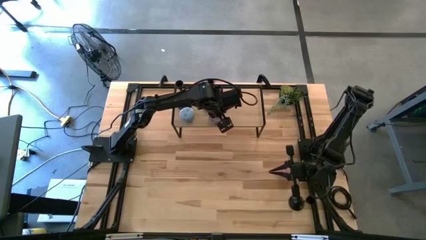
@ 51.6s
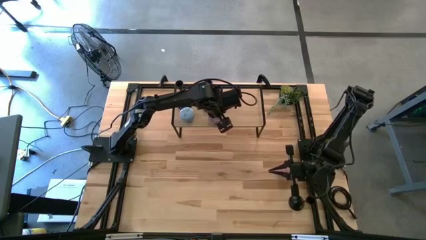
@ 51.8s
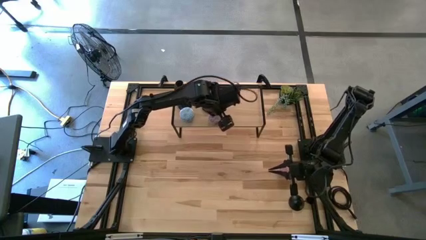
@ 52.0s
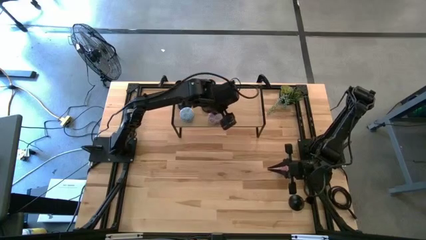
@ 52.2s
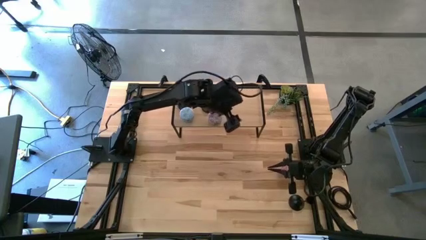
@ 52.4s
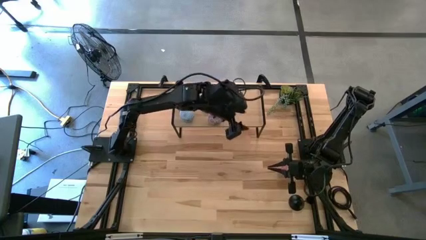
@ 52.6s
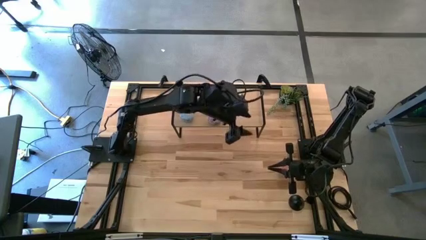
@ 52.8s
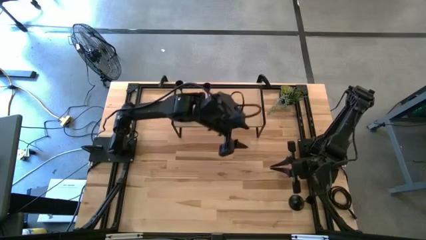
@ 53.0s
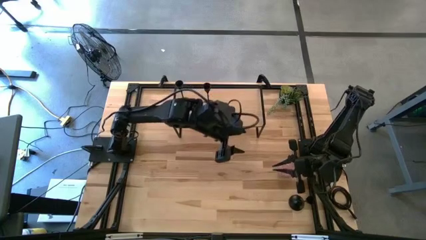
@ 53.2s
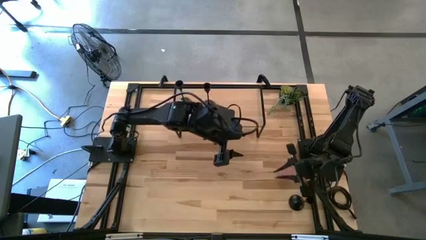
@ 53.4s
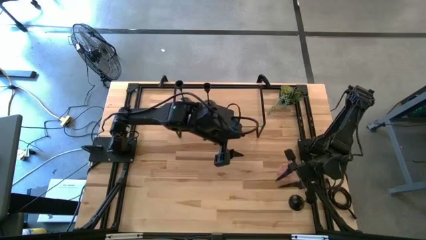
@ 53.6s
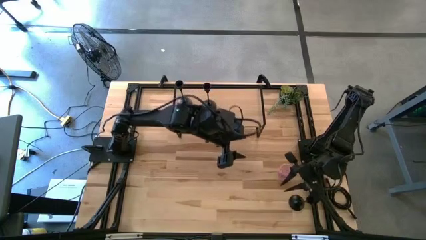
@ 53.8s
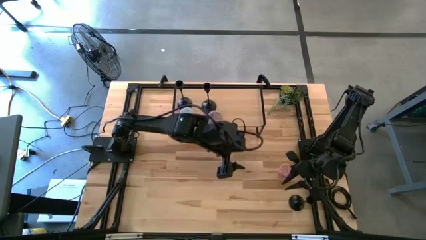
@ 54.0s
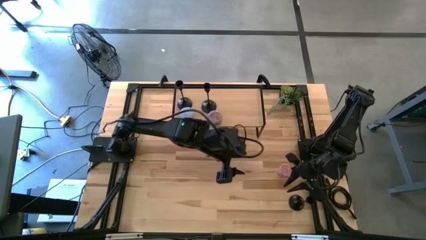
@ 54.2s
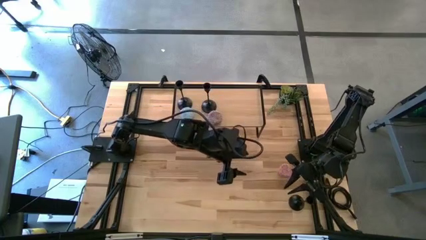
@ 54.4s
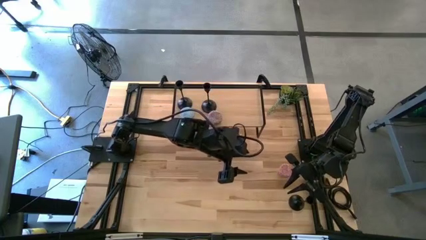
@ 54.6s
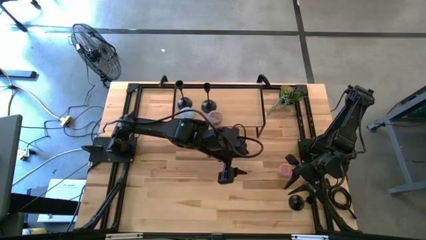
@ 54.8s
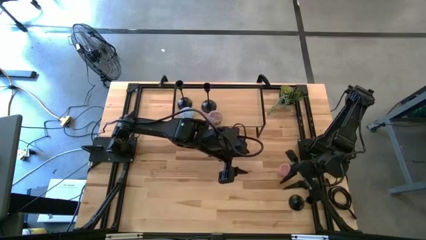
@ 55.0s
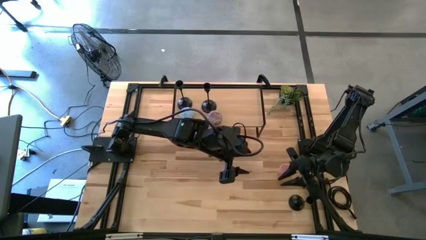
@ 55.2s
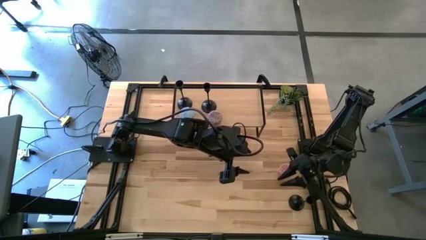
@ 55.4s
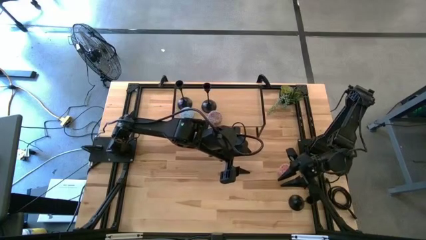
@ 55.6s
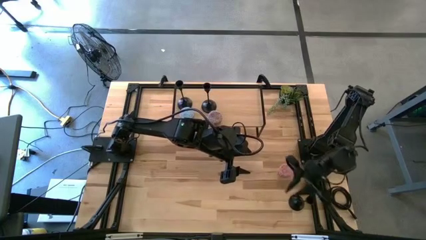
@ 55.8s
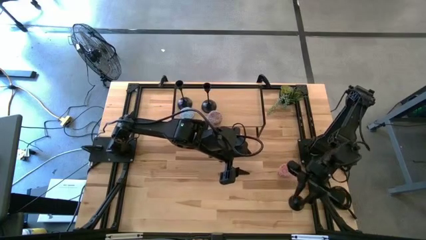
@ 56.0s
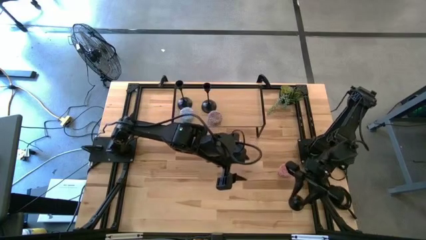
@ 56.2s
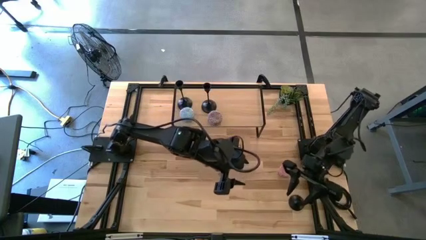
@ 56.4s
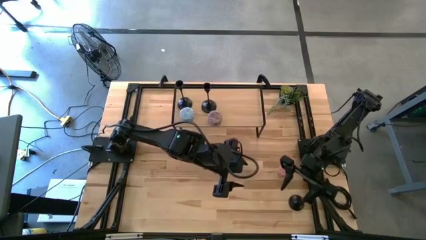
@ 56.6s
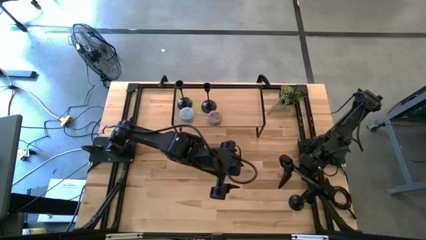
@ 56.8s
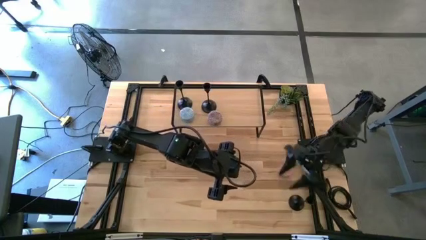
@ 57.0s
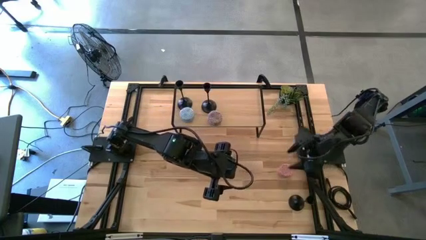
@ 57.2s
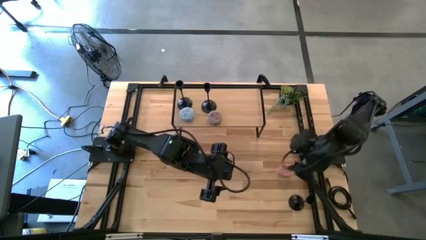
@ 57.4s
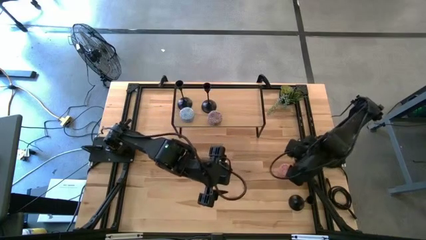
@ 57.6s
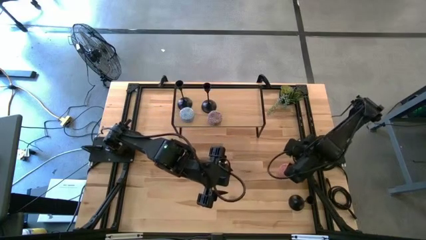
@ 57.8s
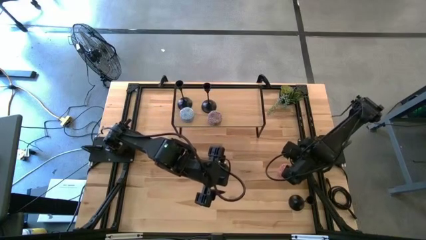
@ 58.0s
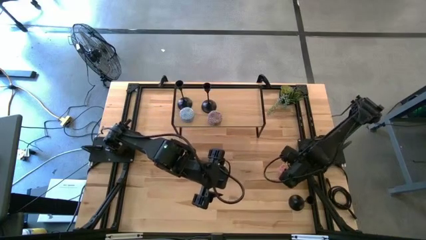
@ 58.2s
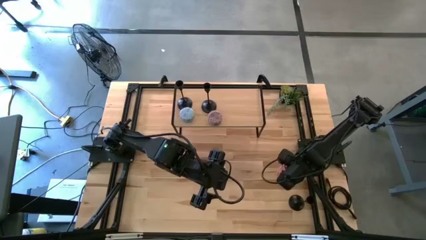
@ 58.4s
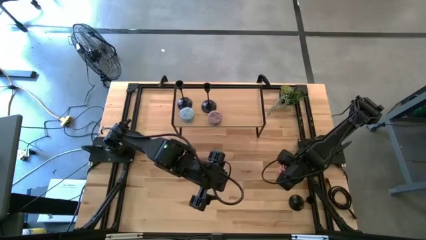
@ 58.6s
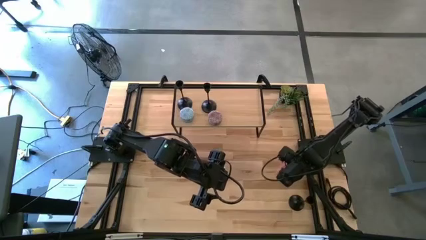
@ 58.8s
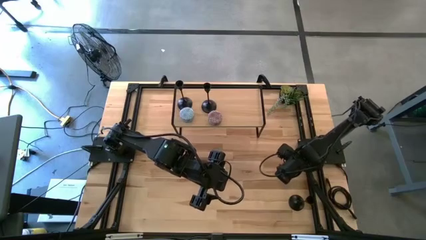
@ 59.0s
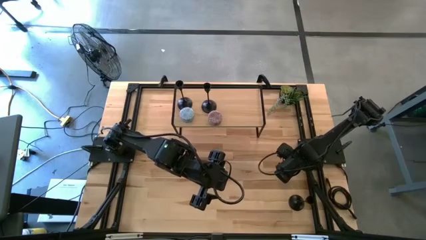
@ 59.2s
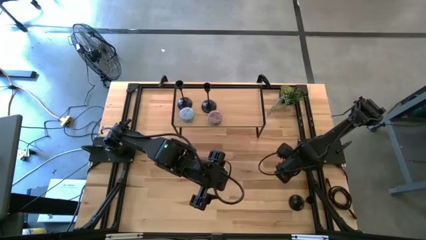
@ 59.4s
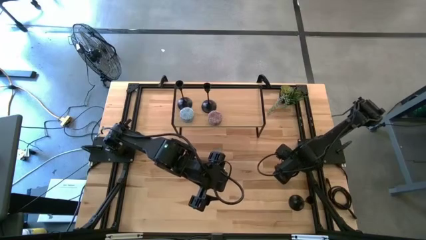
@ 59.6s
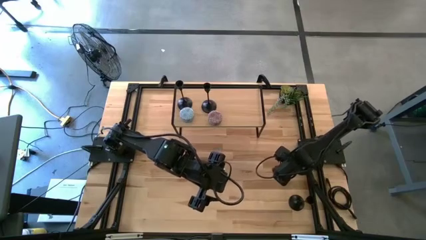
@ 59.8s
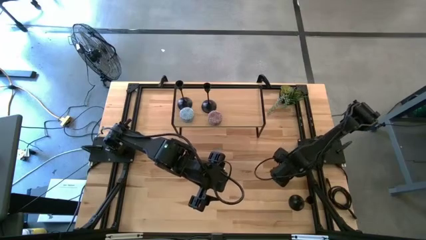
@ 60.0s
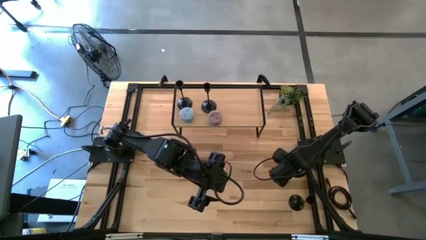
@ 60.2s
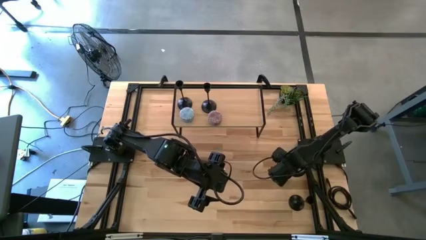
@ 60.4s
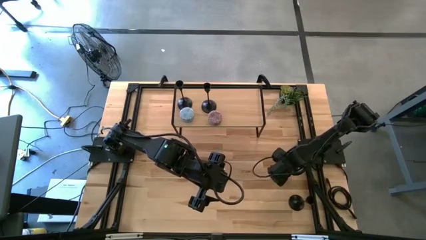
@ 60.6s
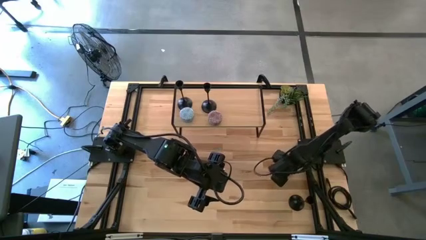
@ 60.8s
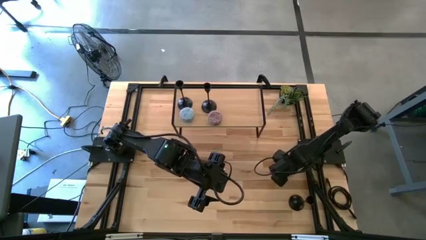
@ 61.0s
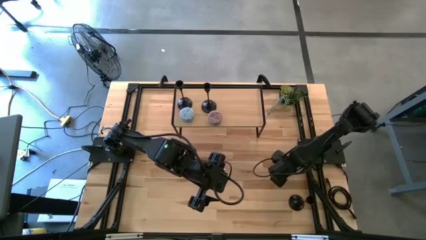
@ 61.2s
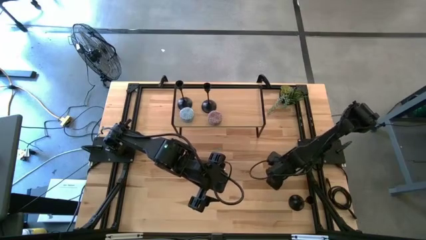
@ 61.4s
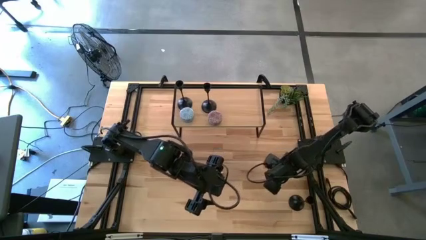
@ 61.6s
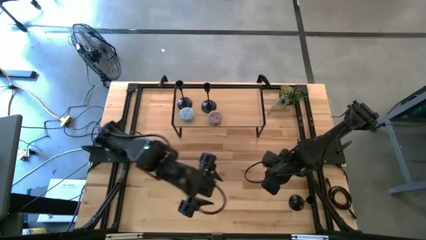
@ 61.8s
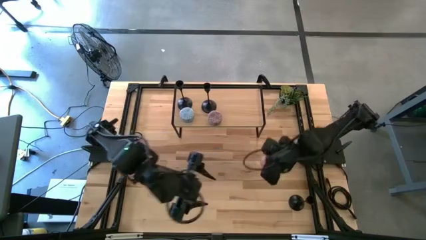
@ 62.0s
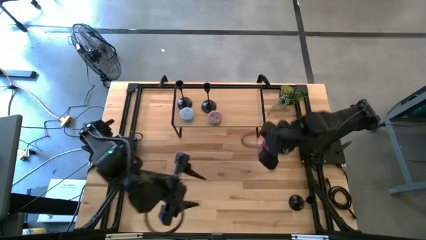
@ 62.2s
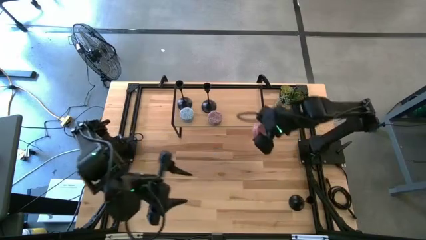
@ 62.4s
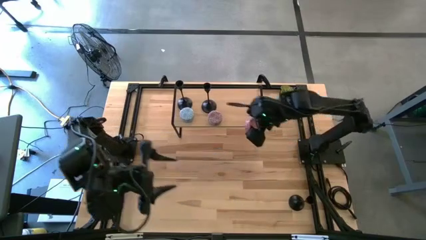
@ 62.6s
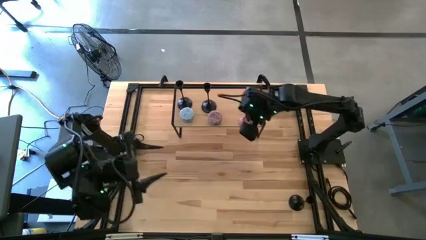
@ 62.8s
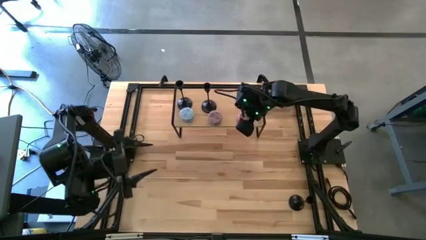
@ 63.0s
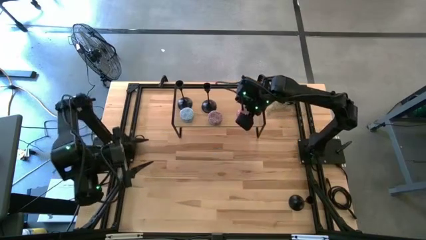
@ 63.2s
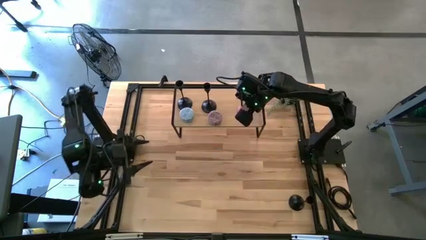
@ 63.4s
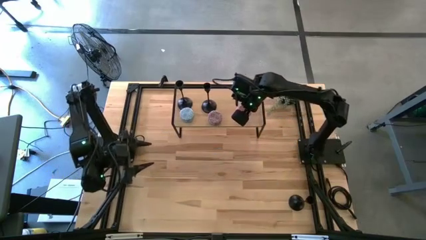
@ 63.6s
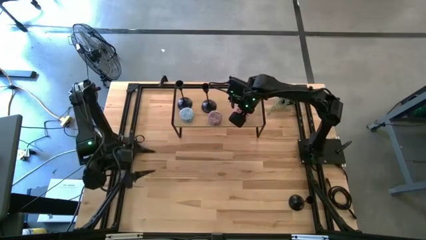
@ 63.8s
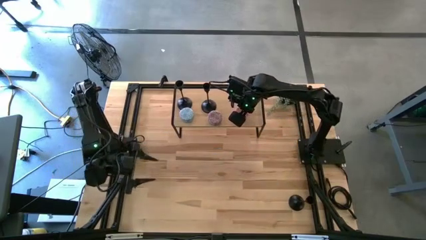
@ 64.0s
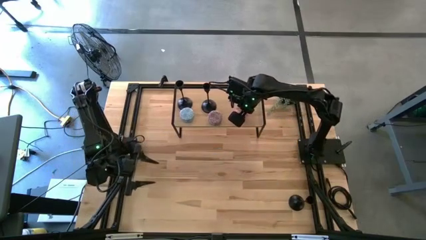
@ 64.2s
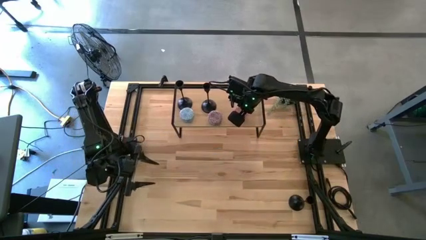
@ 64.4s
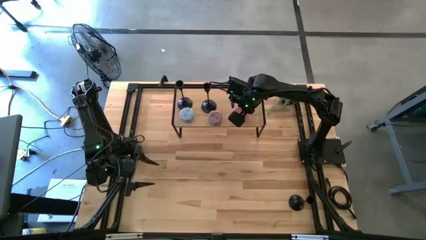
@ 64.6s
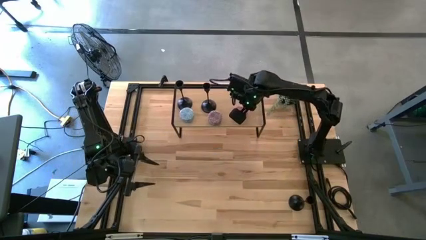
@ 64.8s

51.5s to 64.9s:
Task: Pick & Place candle stick holders
Put the pink scented candle on the shelf

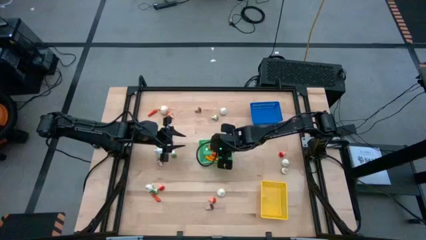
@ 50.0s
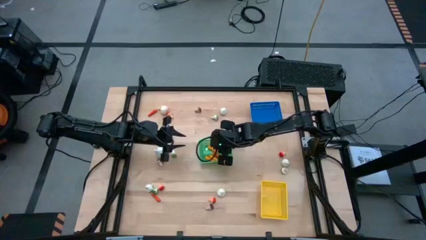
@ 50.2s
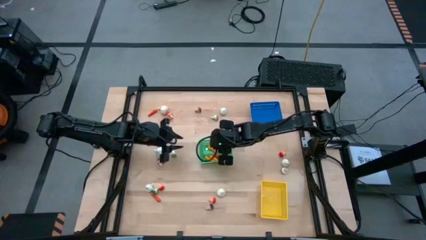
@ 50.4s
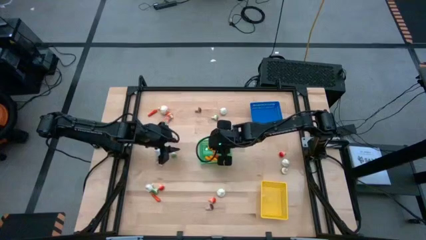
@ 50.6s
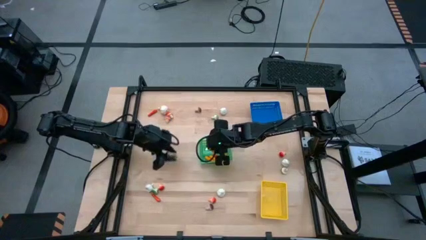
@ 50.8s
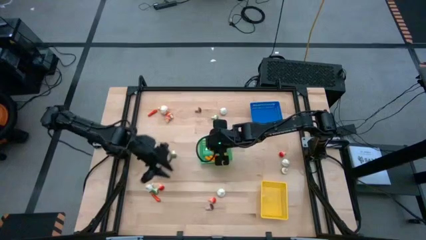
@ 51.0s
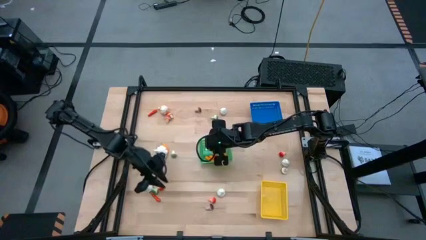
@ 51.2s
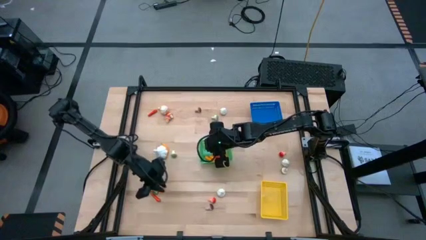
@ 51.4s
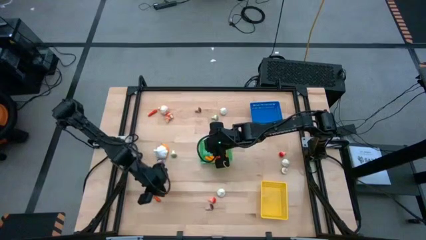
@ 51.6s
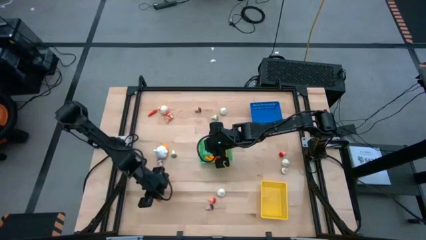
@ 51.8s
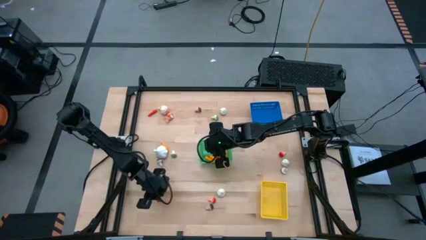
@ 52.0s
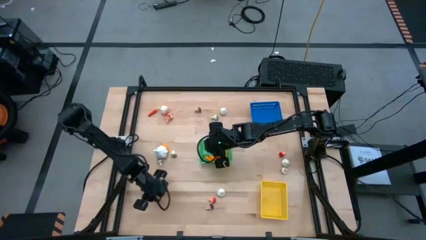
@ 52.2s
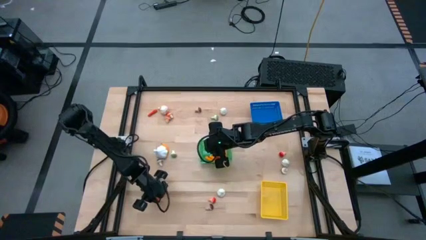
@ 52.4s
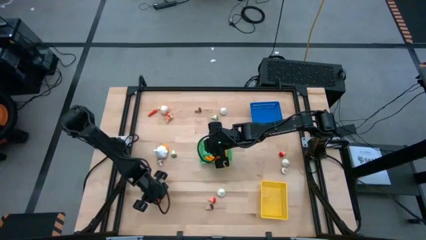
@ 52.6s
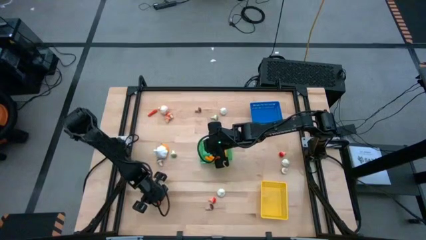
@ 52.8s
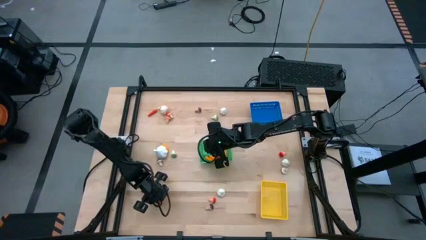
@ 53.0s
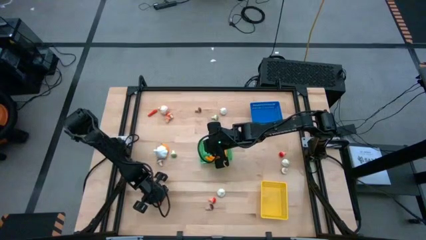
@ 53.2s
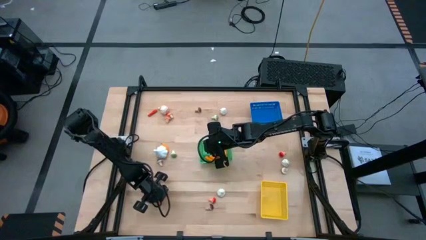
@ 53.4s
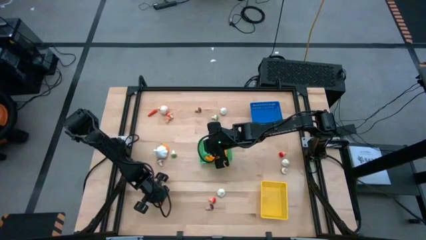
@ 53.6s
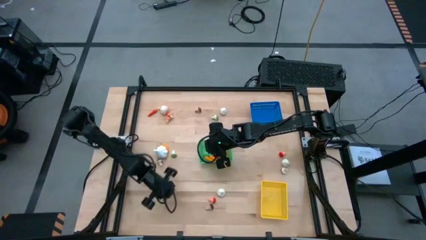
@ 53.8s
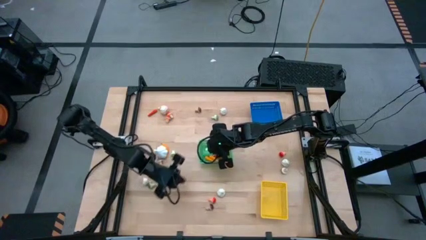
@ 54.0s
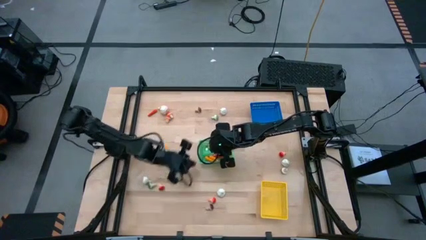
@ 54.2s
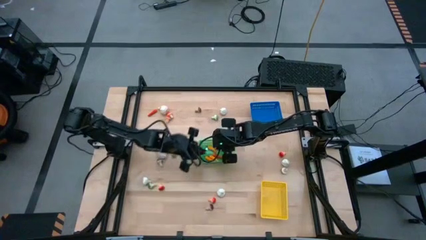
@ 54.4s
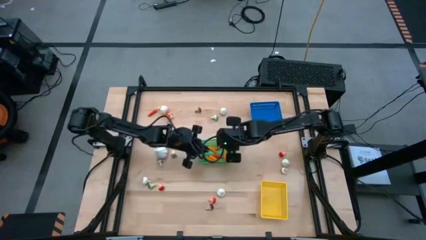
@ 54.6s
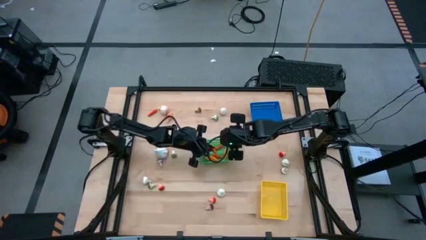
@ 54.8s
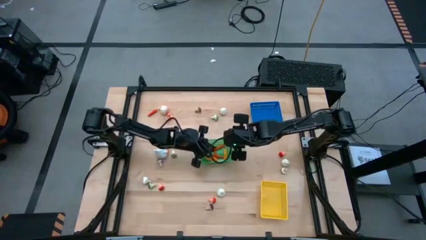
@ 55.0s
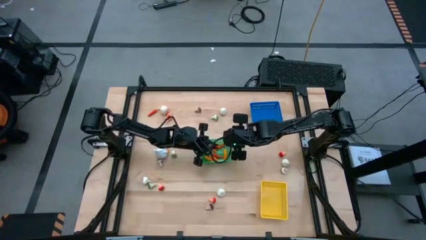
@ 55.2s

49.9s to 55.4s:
Task: Sort produce into baskets
Put the orange chili pepper into the green bin
